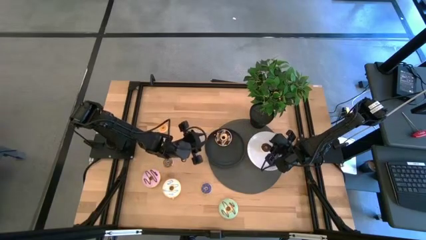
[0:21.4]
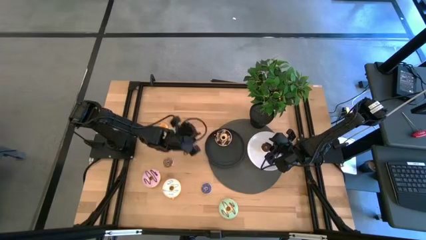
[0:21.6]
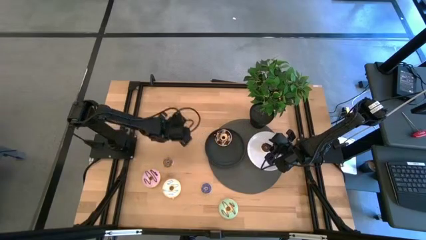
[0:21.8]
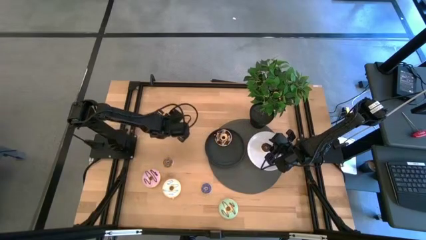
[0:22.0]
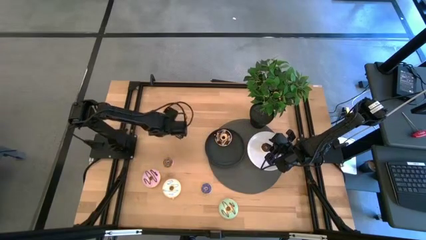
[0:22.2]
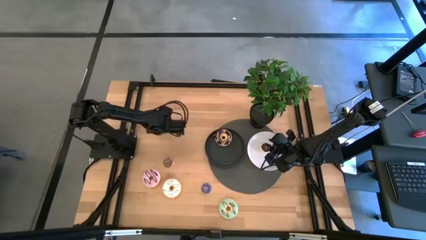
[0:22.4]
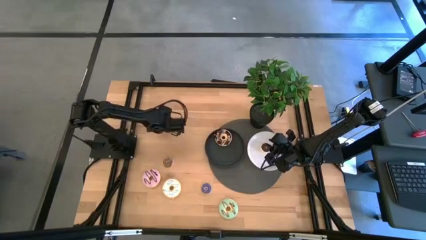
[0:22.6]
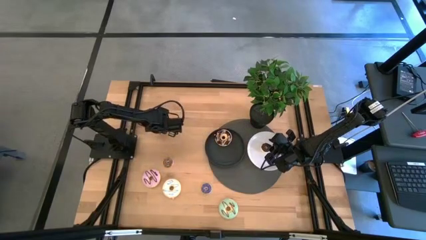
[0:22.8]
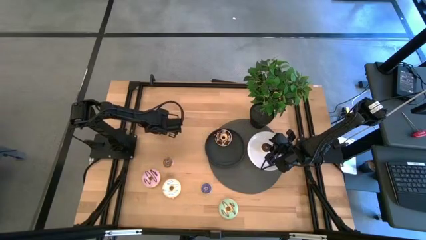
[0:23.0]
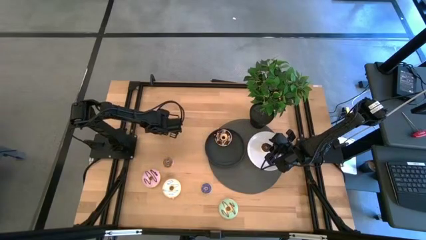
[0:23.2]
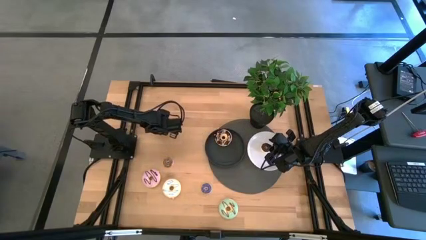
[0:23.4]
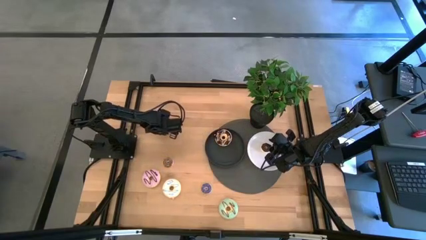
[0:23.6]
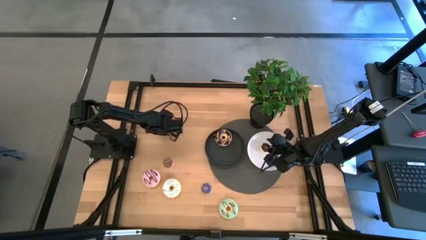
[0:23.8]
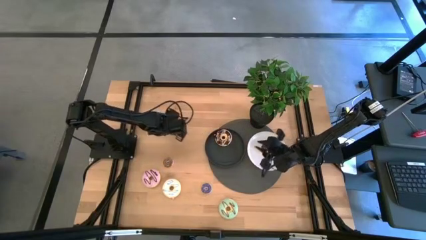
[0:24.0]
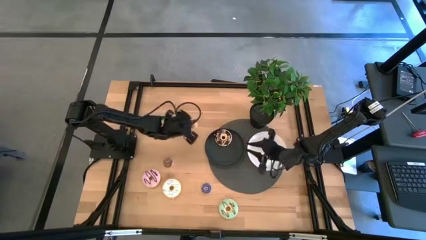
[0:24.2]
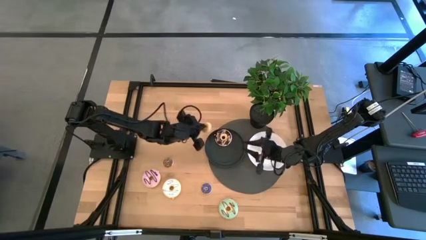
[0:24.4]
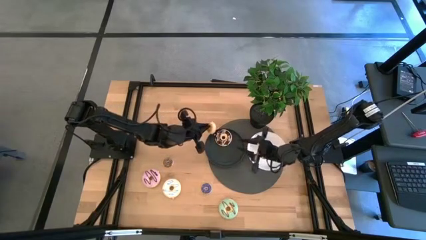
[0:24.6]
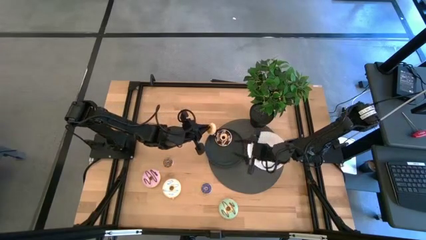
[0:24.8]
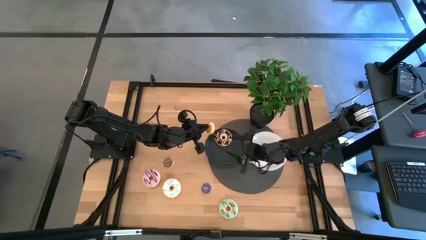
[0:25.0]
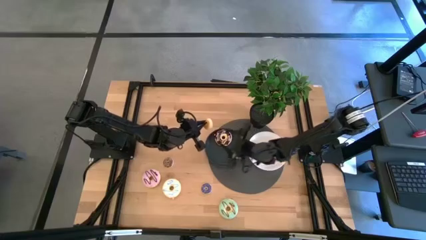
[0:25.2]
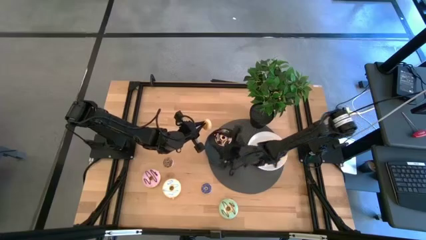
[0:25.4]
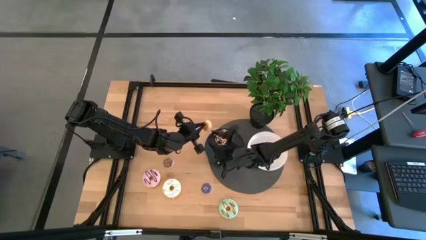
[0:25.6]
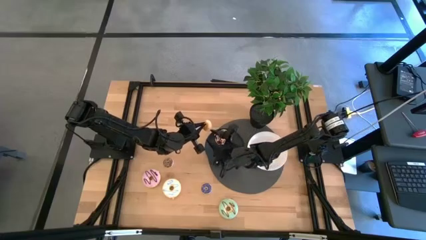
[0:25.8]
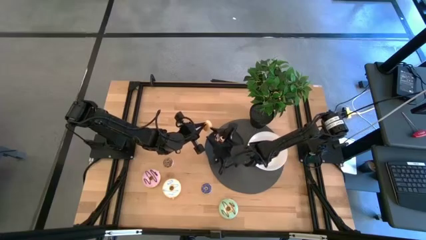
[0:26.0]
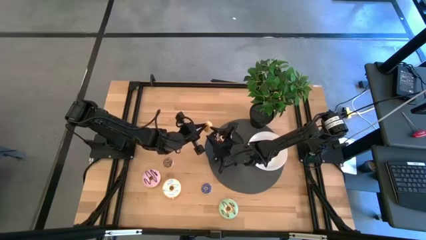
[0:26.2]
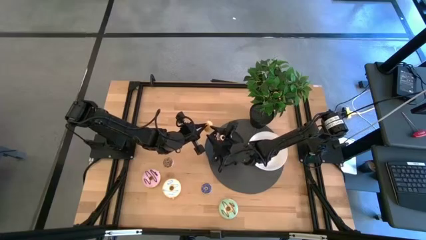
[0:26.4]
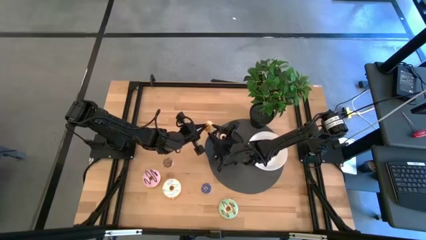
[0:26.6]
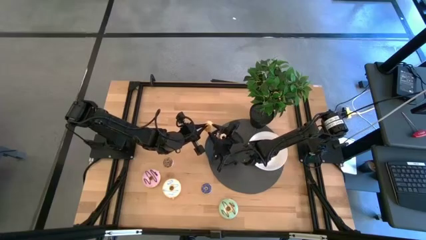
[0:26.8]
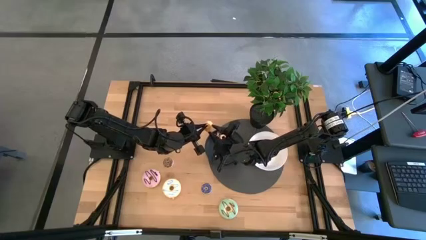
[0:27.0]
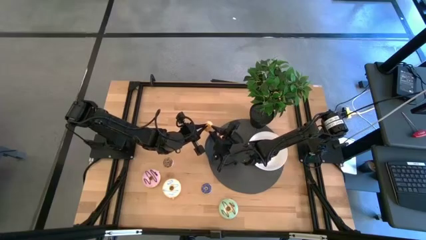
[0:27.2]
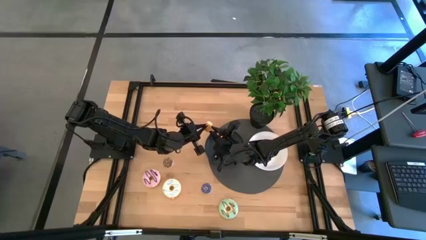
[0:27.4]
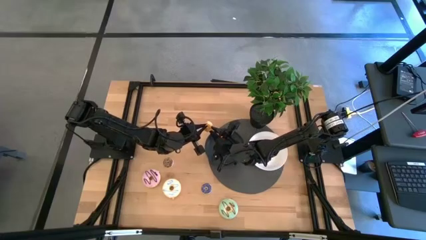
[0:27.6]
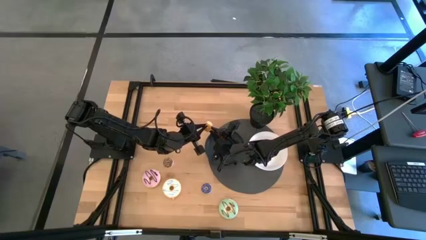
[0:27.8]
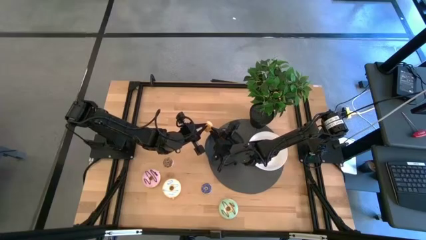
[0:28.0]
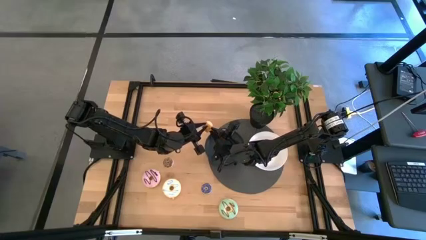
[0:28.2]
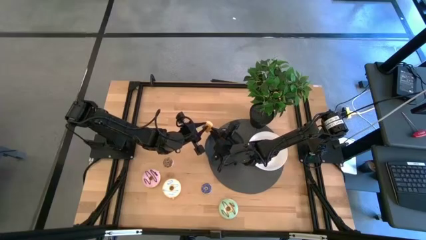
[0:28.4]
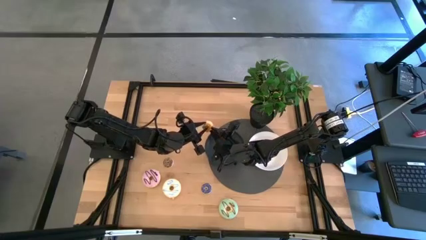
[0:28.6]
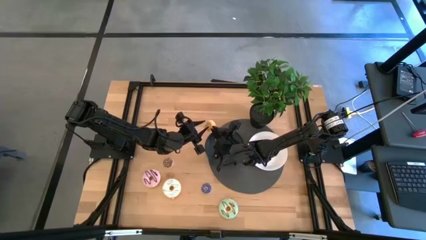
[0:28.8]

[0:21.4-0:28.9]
Task: Pick & Place donuts
Put the small yellow donut on the white plate

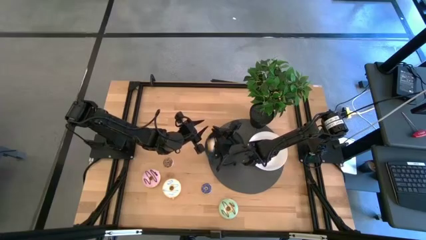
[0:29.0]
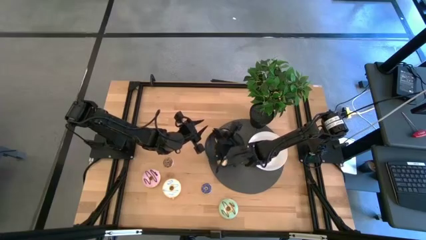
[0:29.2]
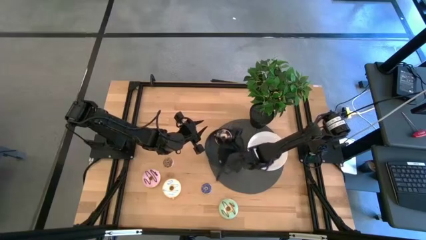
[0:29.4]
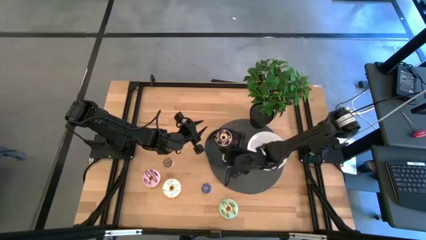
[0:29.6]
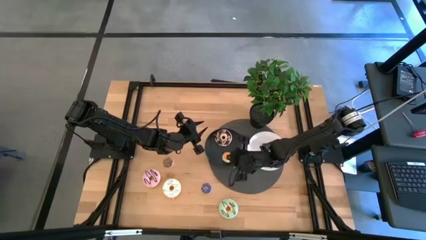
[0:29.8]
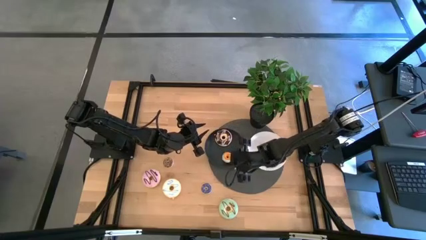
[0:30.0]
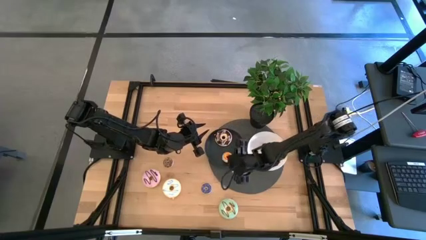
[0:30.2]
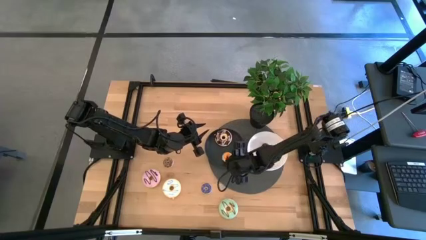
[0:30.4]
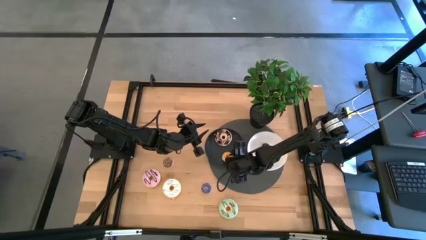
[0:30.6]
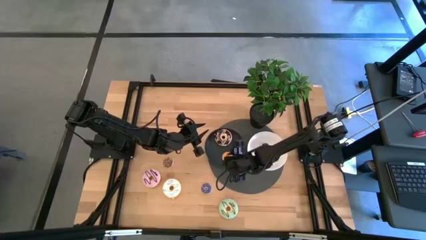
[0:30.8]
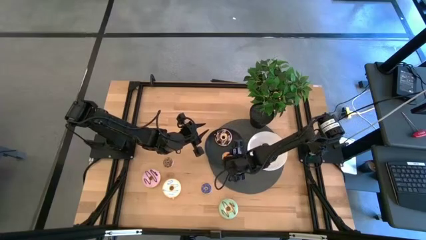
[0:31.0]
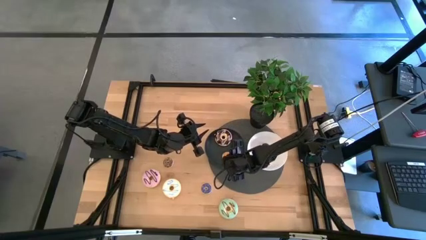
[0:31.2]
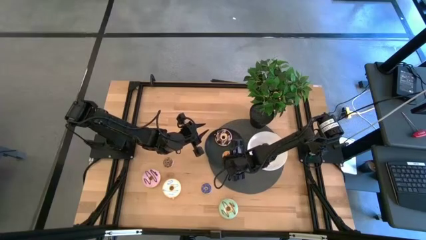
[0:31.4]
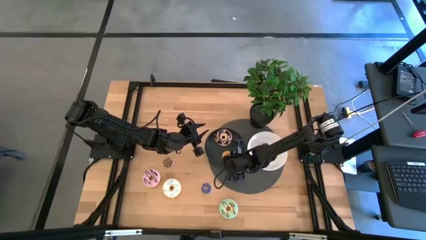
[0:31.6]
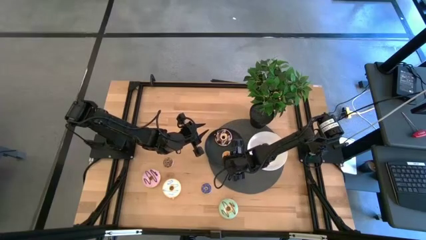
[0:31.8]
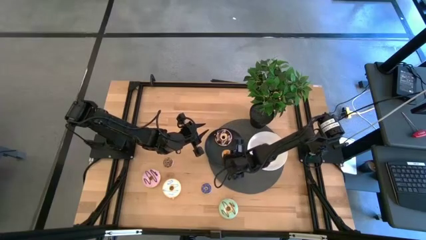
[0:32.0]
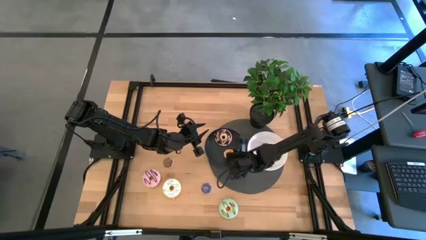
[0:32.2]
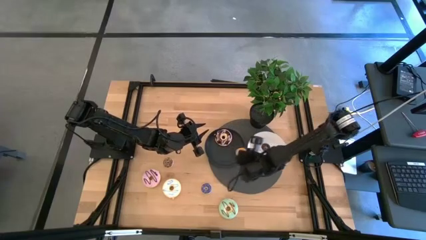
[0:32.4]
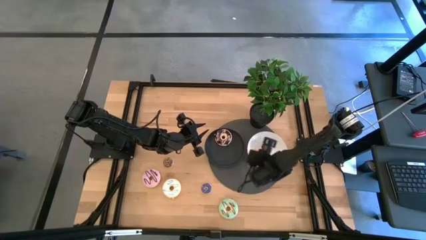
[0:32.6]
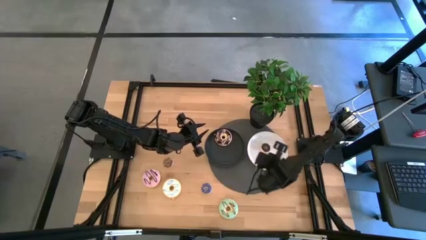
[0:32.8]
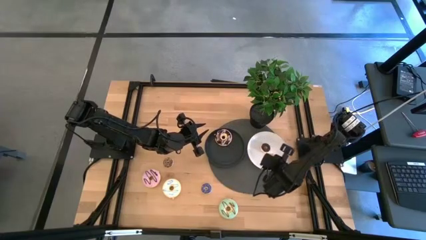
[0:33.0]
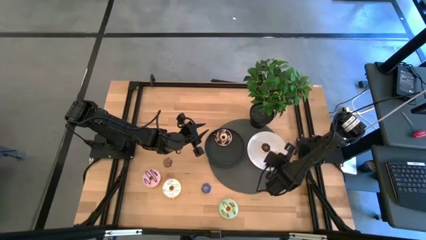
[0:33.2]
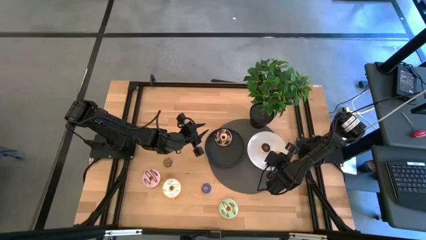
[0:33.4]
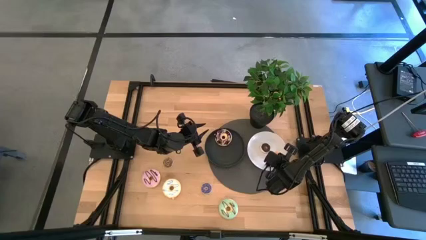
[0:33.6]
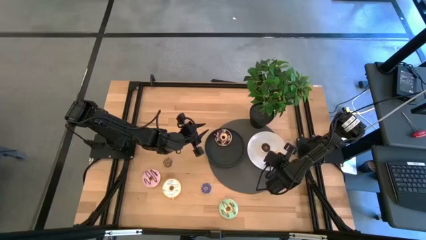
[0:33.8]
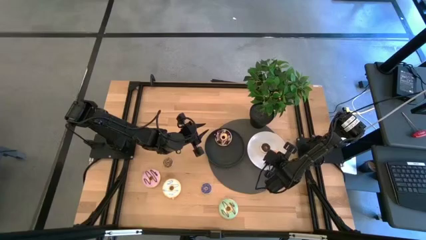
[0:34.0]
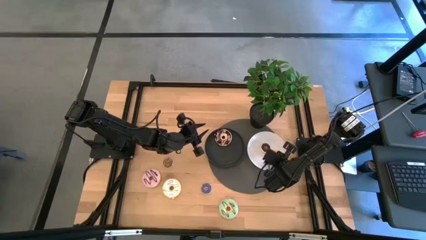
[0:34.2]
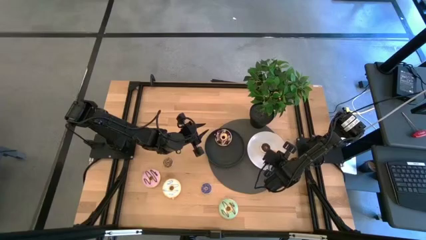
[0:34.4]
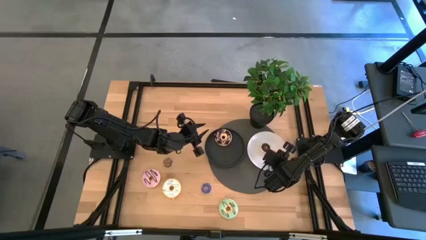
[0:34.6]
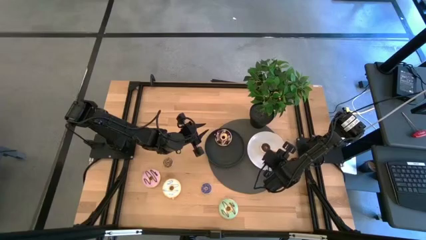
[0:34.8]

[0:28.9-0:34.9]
Put the small yellow donut on the white plate

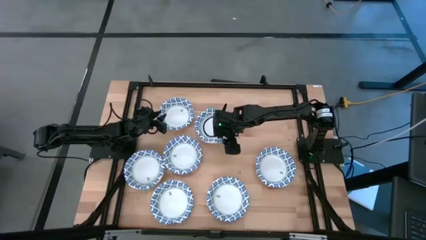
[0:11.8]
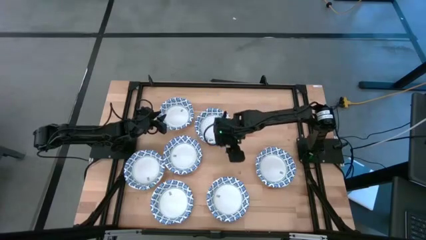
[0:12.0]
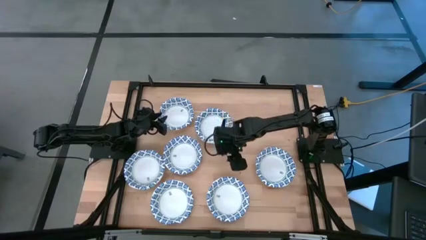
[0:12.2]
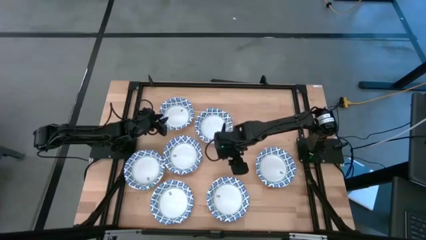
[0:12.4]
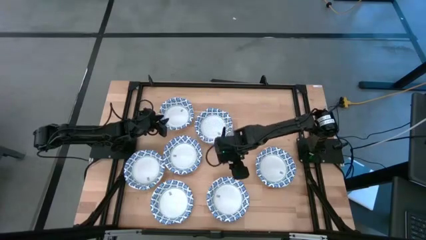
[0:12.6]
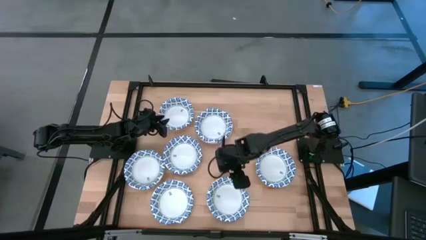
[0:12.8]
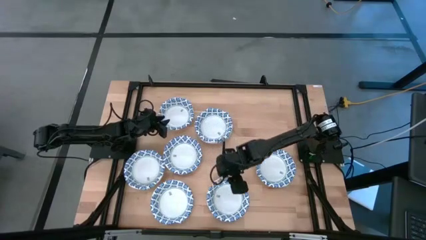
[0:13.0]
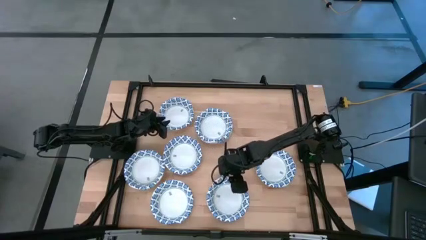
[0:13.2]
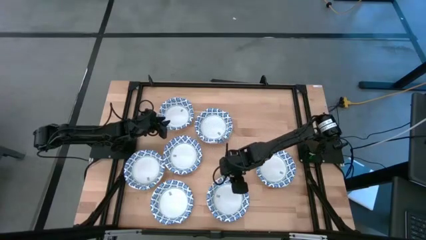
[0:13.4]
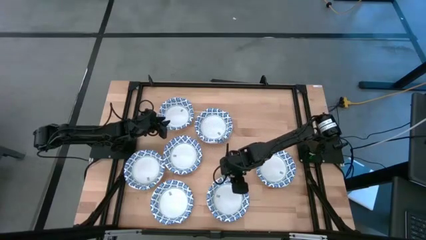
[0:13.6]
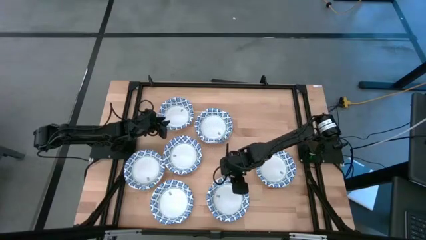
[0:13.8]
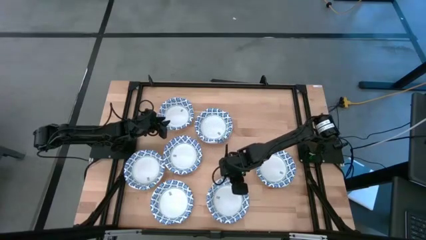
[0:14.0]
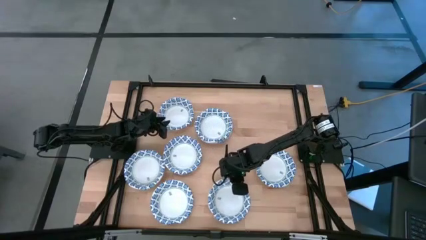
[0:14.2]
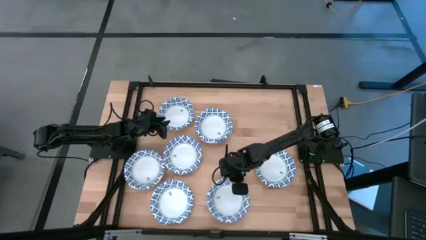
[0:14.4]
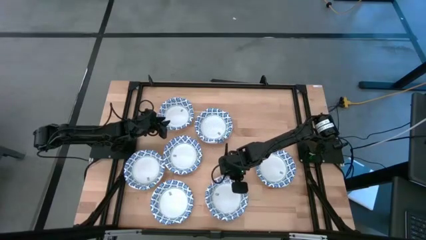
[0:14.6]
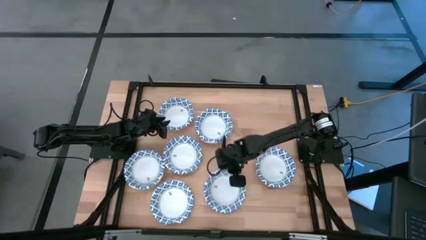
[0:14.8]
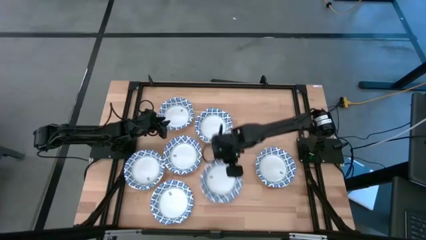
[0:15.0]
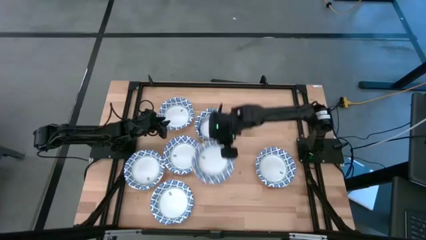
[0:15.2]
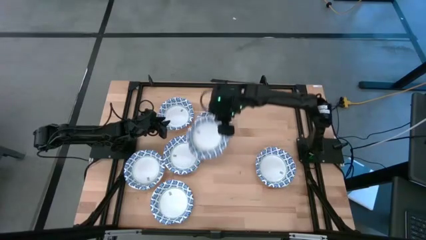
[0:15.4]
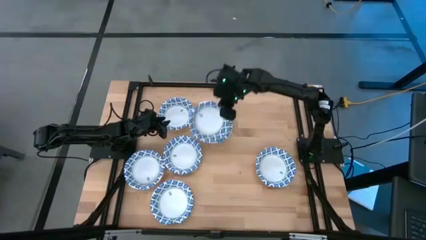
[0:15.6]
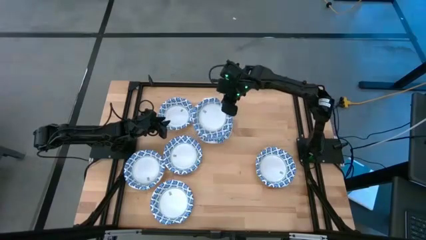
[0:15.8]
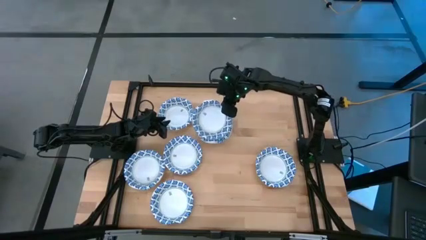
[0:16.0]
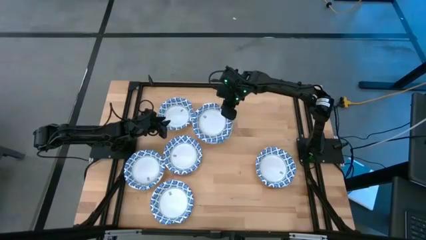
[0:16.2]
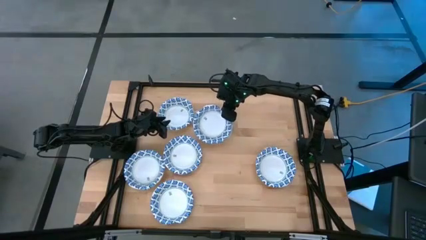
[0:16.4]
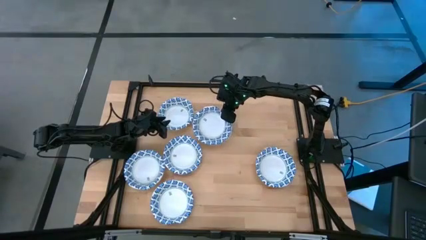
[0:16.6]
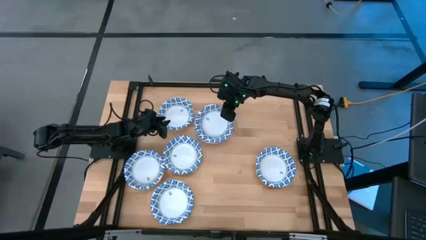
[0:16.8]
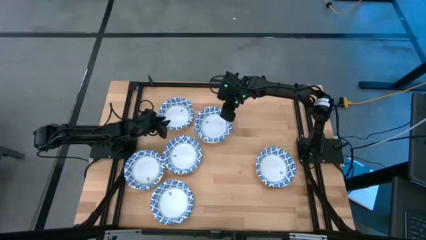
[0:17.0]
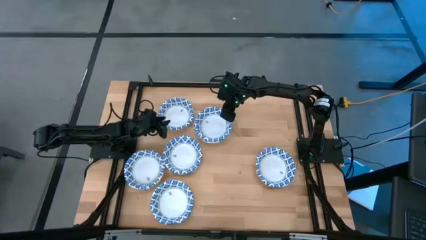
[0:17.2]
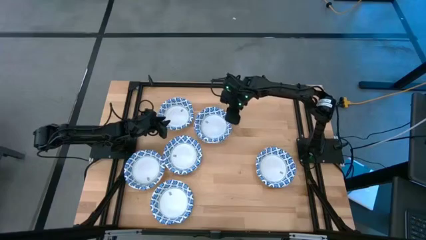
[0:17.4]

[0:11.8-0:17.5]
Task: Nest bowls inside each other
Stack the white and blue bowl on the white and blue bowl on the table
